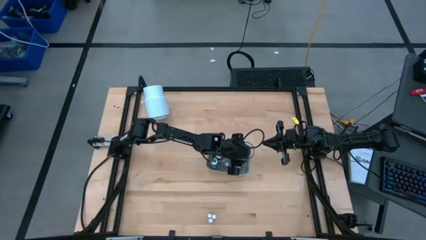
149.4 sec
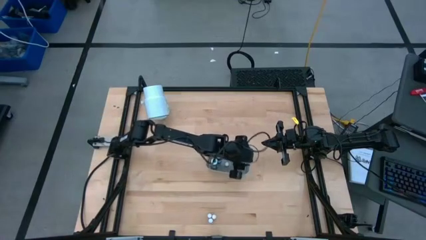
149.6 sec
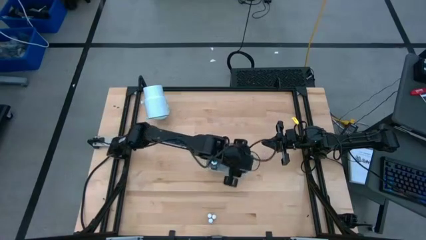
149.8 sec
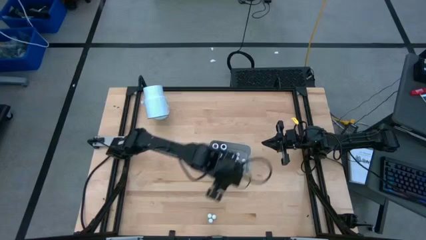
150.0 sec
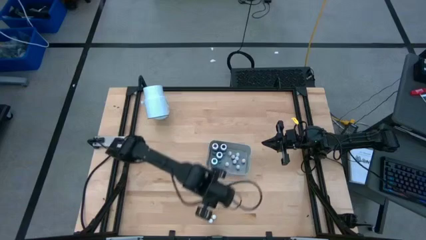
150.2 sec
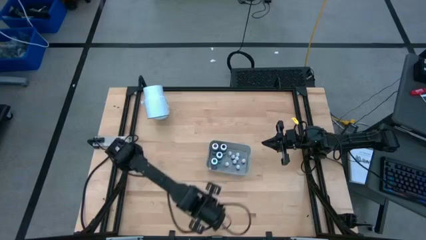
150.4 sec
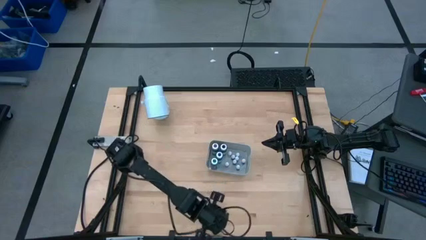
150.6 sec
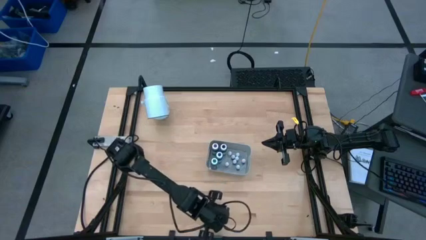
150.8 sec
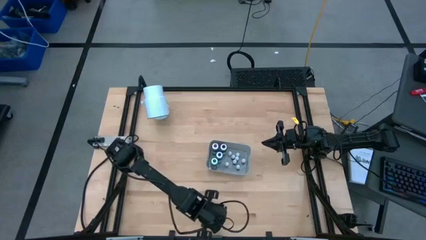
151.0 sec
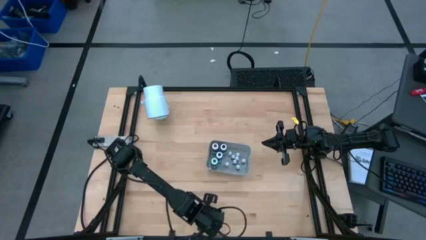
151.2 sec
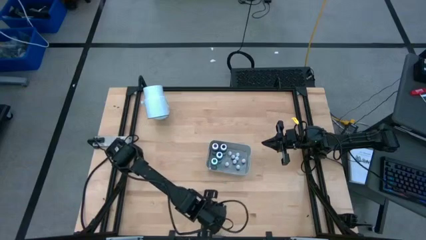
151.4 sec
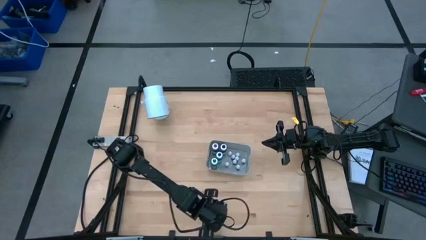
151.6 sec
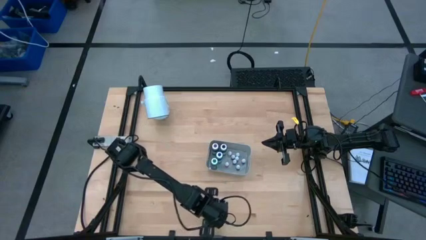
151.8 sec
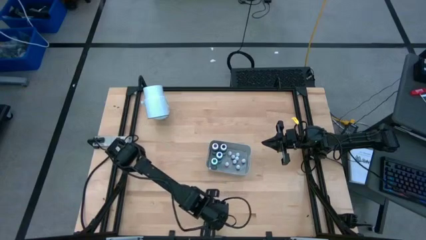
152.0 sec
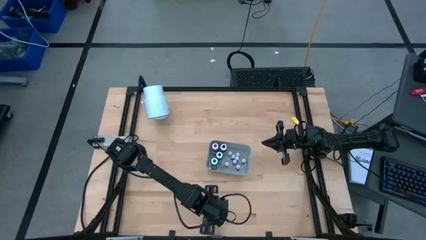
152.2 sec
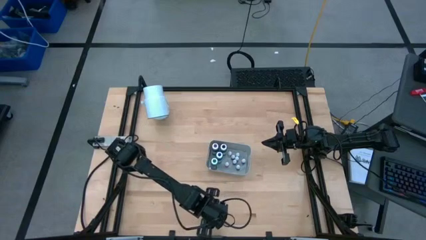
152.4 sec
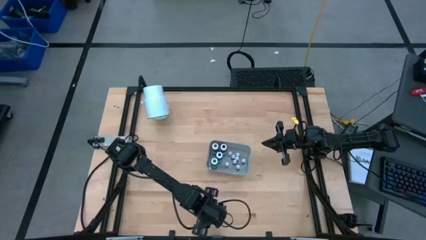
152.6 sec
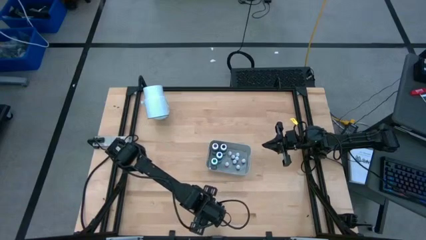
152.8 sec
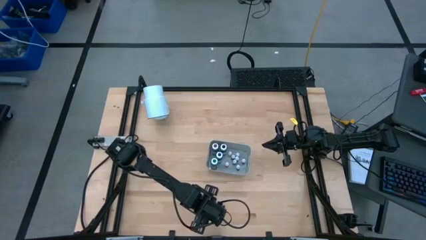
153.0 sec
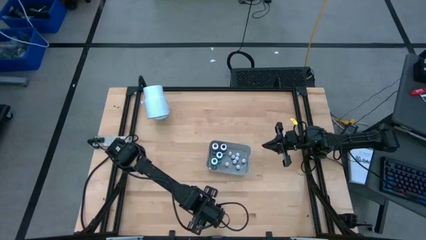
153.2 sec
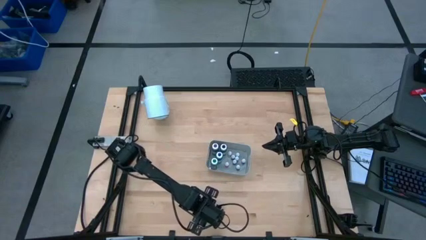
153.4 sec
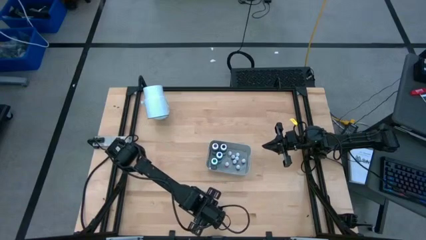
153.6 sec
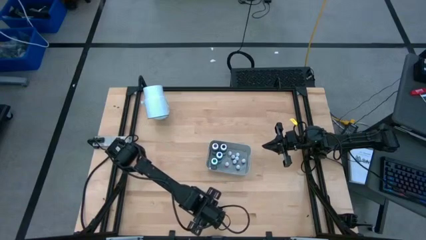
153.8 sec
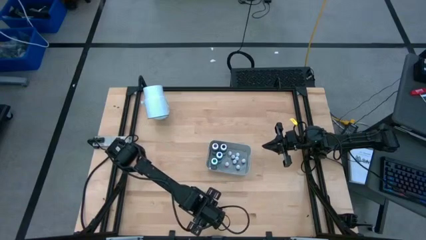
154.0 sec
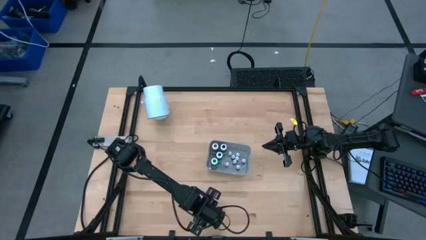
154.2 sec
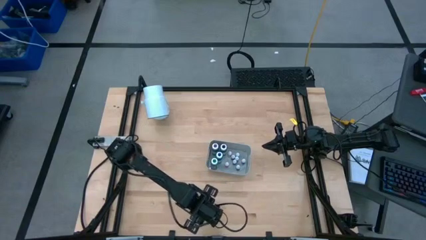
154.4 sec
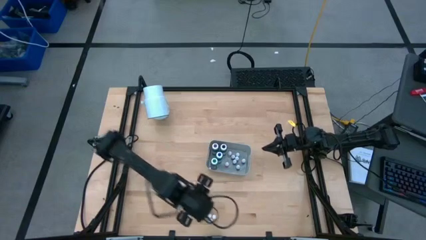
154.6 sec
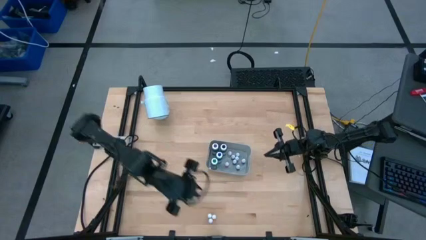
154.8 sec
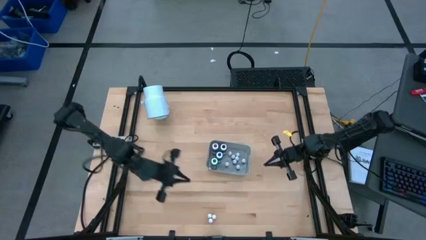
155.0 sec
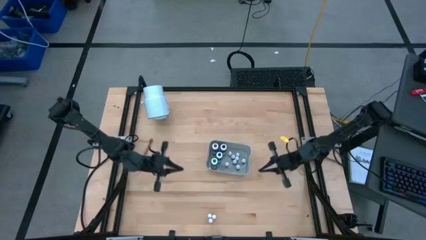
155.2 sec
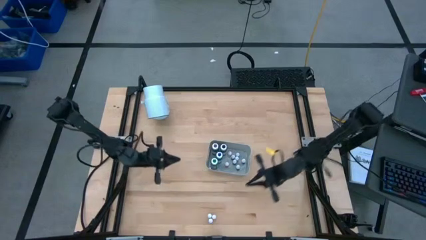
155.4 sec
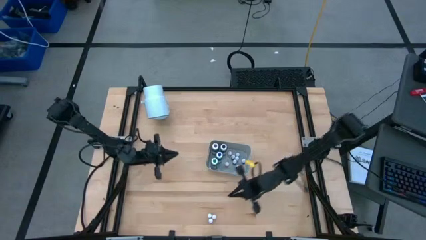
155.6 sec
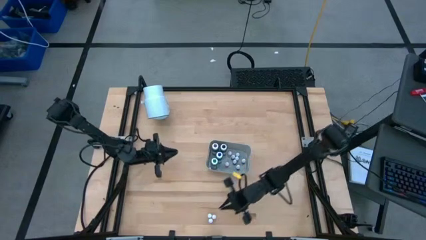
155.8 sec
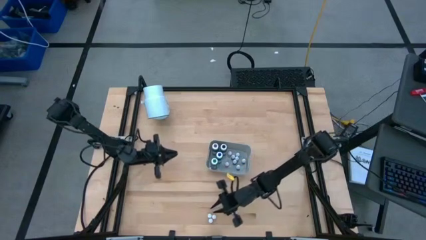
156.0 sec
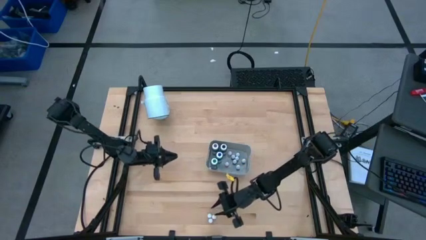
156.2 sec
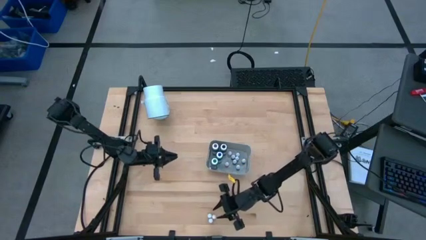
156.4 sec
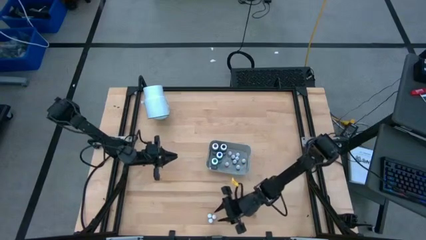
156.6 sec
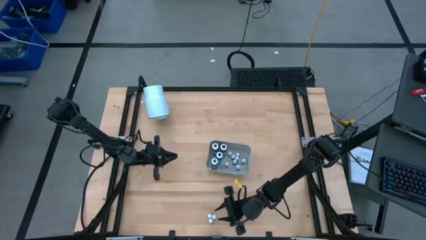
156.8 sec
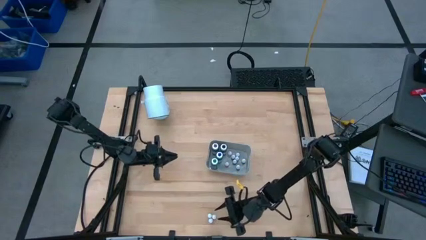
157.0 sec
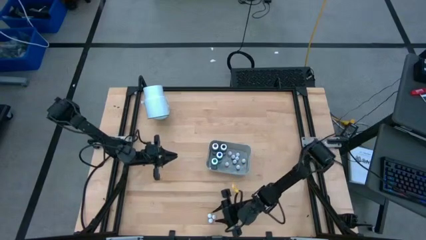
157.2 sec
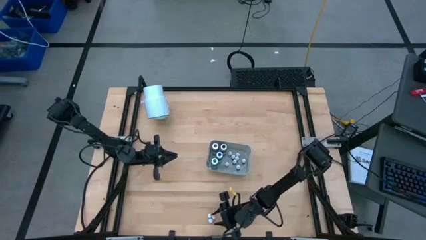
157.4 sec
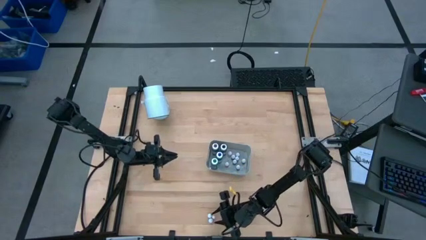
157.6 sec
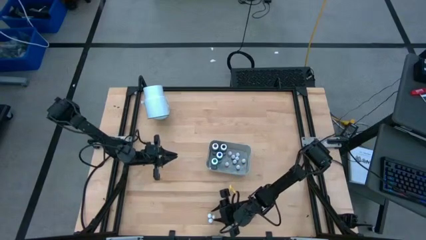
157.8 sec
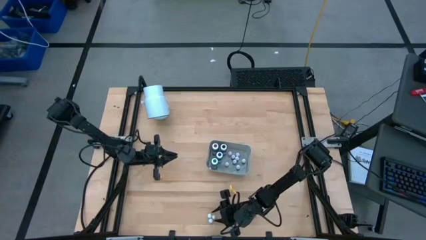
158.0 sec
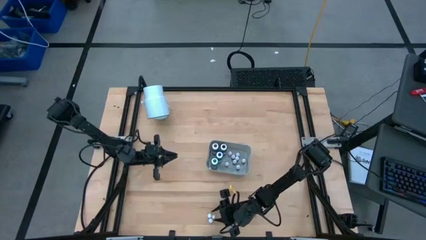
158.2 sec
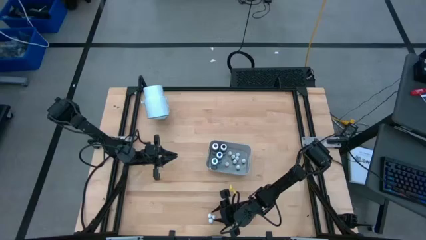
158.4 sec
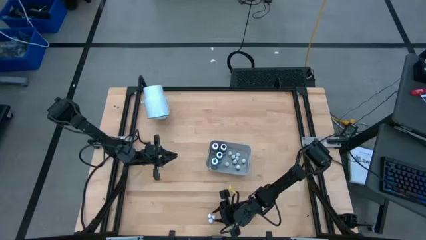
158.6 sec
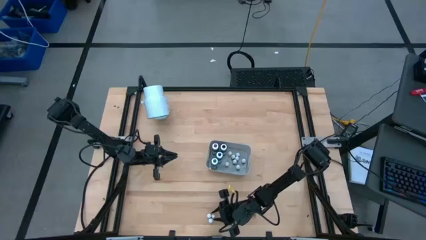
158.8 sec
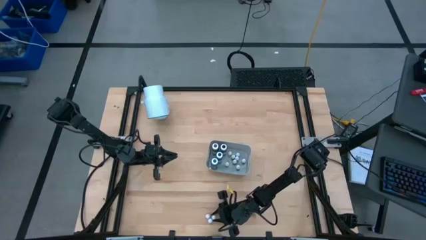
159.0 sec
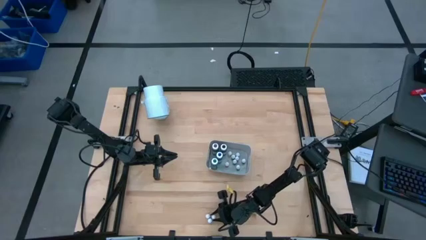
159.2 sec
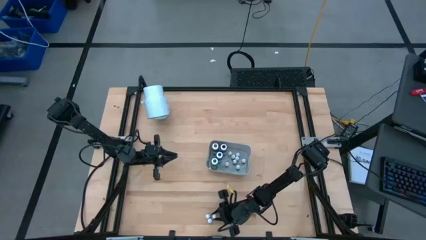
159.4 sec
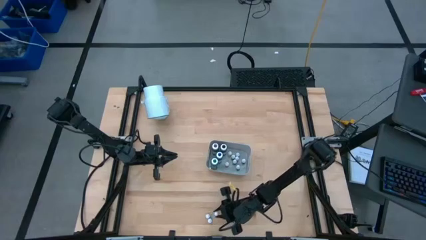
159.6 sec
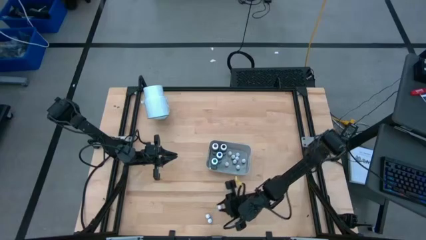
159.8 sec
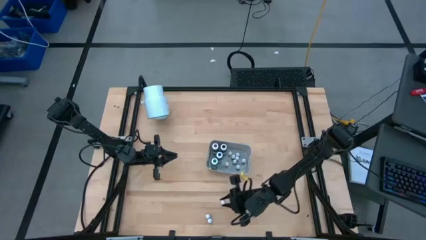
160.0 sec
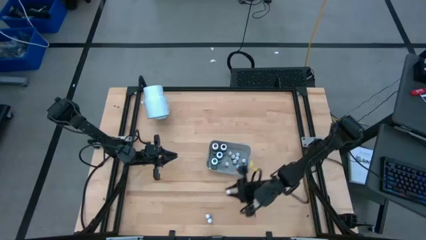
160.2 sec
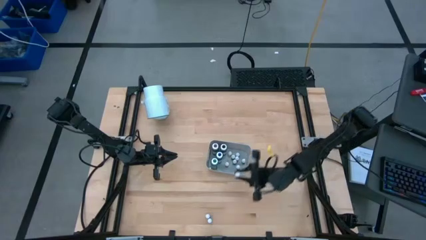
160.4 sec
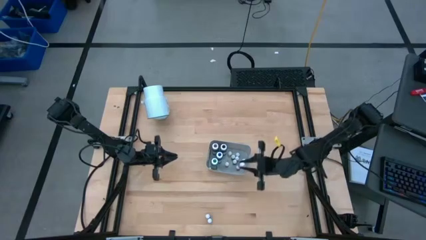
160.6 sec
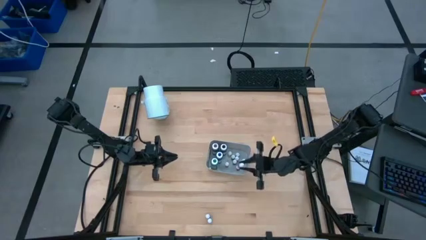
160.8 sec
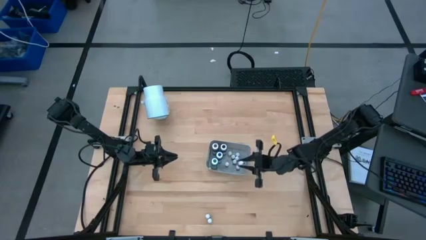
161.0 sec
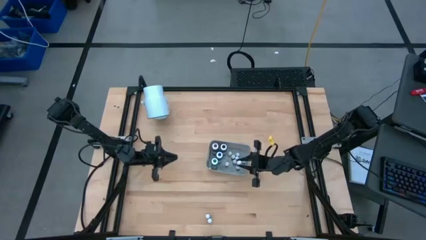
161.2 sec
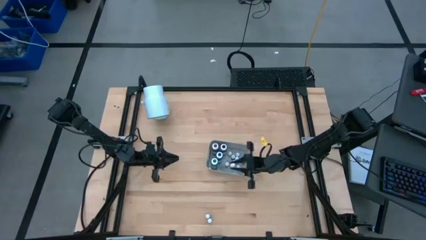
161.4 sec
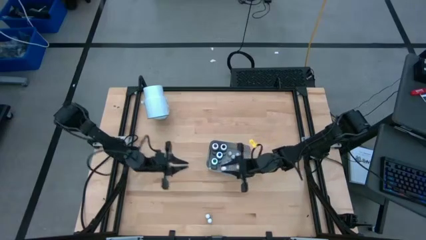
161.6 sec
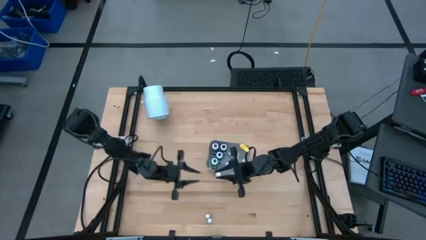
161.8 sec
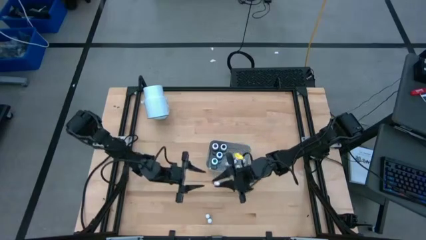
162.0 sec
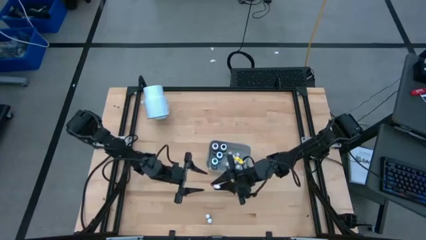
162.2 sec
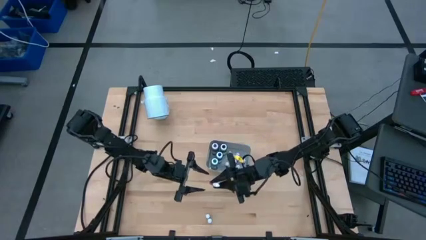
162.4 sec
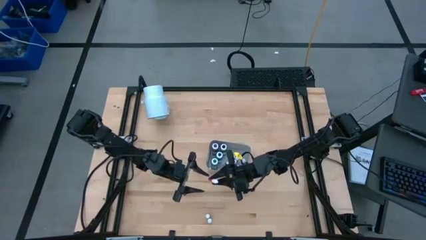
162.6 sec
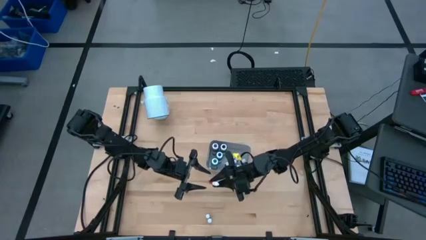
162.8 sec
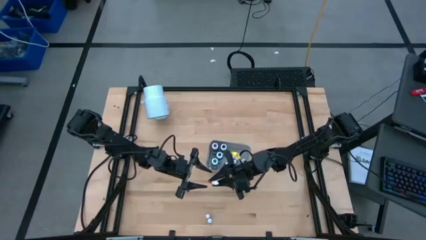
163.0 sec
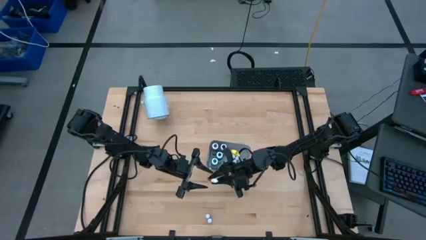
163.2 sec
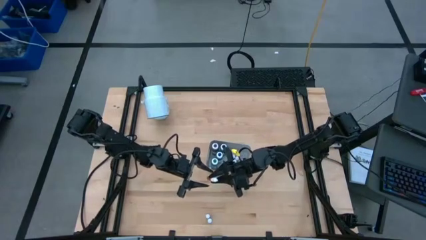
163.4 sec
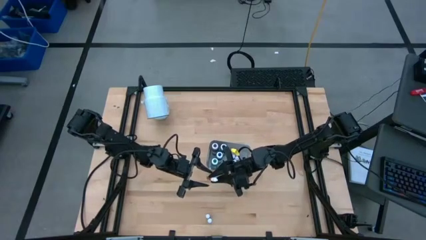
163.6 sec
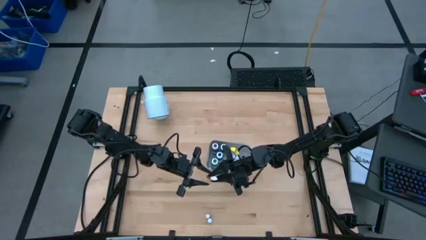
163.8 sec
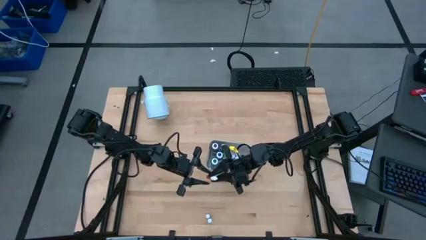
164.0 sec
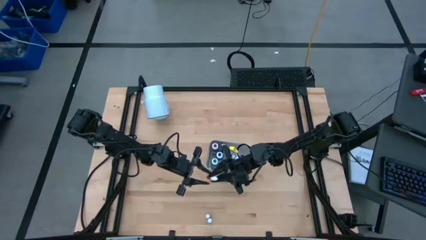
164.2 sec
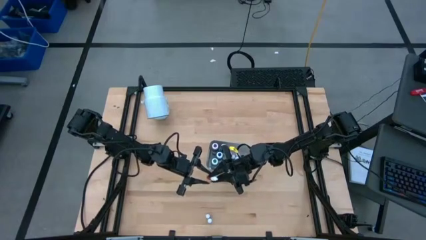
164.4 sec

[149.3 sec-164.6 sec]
Task: Pick & Place food coloring
Put the small orange food coloring bottle into the bin

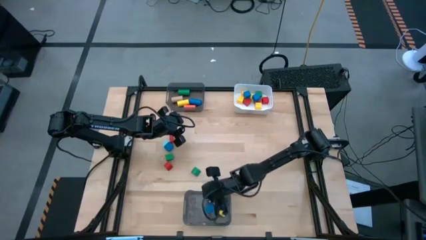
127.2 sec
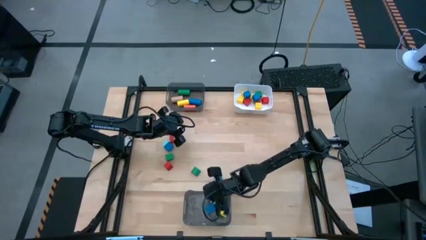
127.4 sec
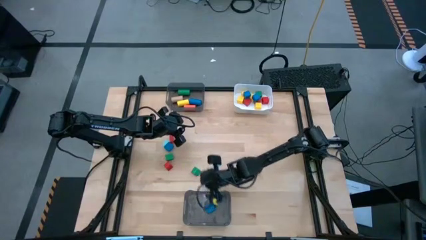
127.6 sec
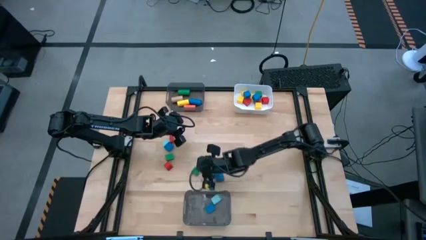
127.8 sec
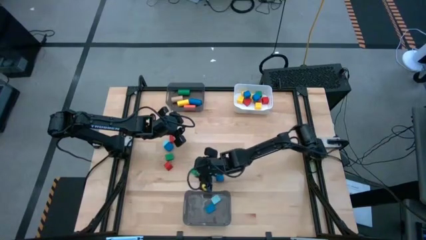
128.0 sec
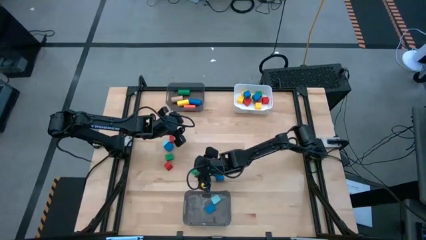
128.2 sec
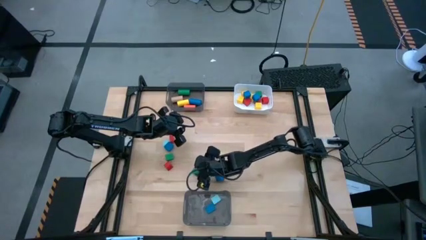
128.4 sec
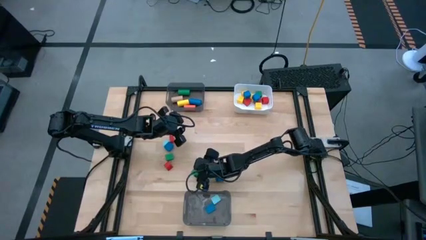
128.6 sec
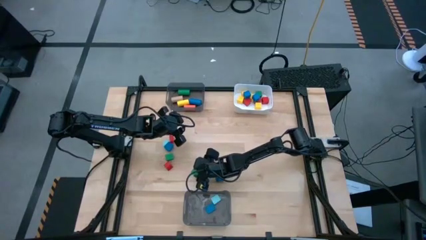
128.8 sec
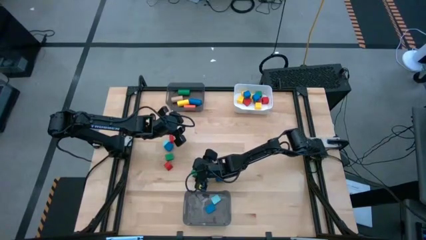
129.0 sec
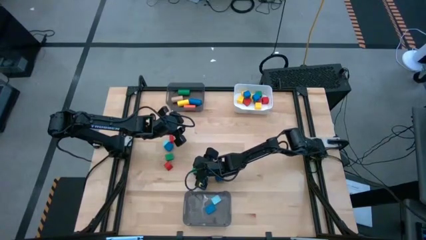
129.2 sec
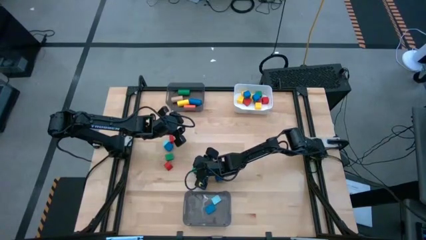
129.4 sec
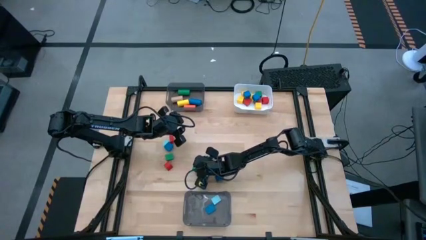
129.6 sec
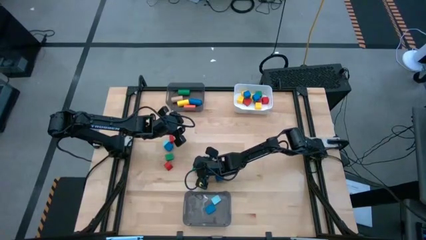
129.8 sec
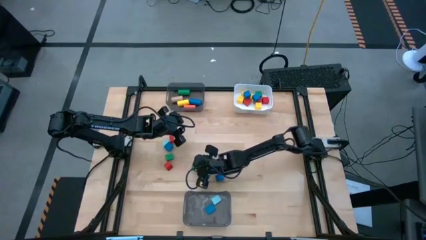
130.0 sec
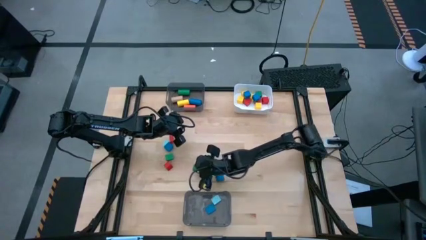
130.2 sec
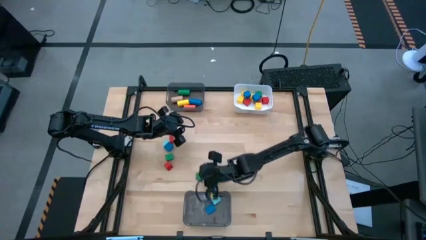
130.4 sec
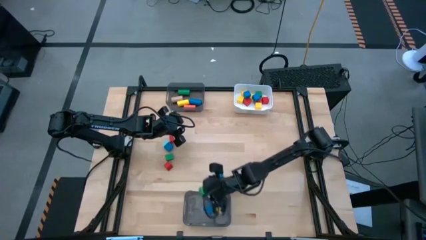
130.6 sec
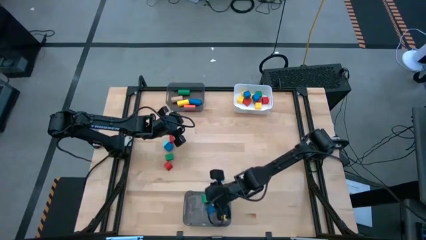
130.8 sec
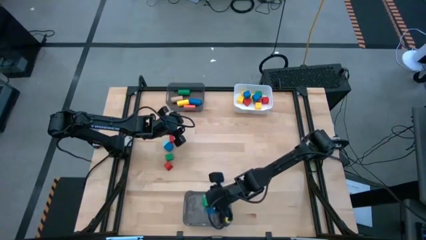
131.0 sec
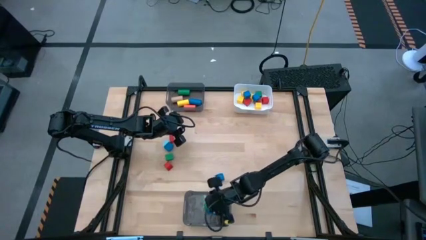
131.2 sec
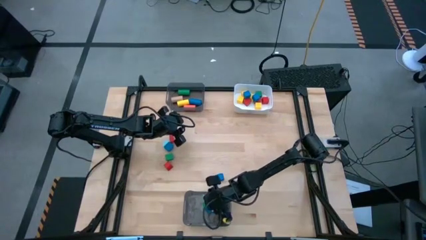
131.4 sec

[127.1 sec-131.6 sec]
Task: Sort blocks by size
Put the green half circle block into the bottom black bin
